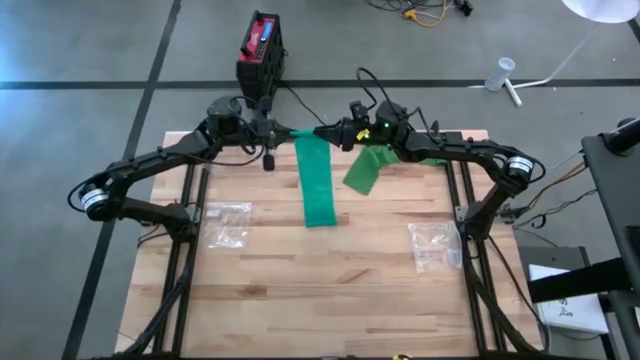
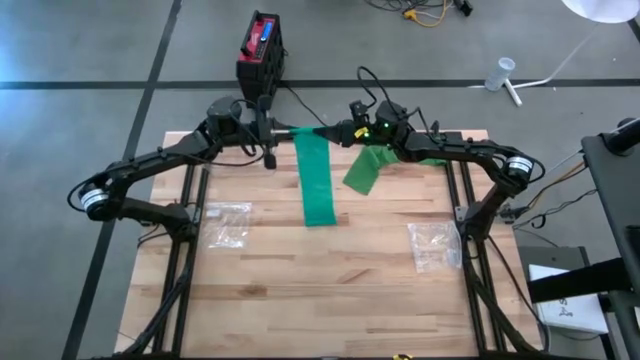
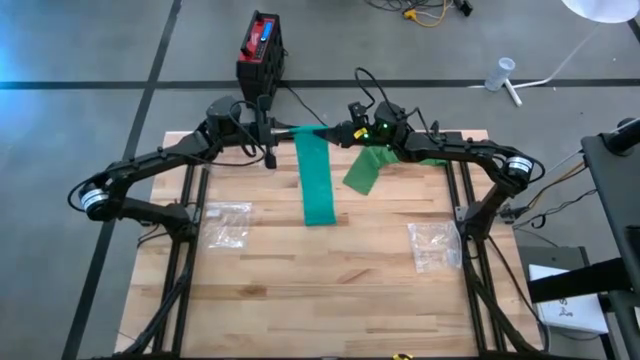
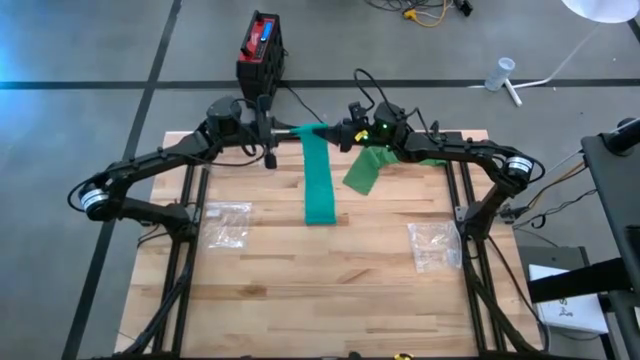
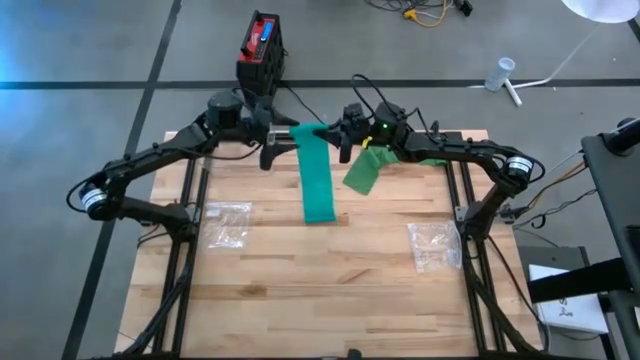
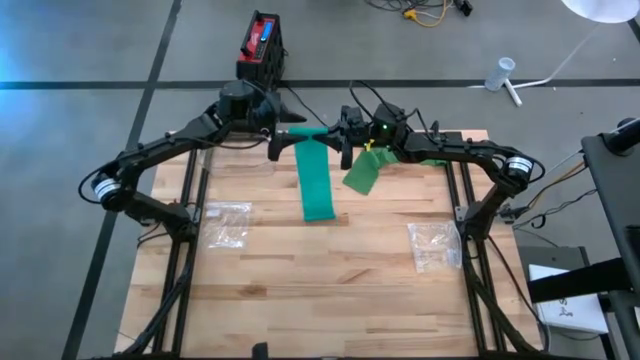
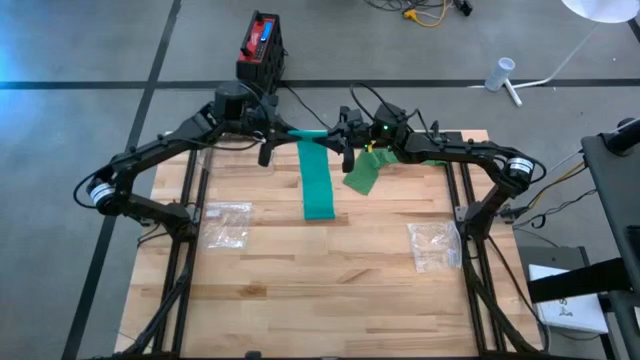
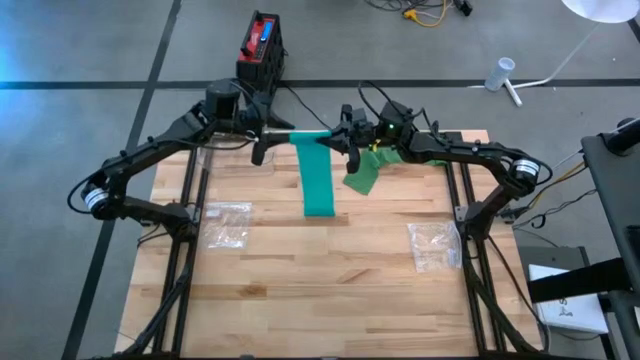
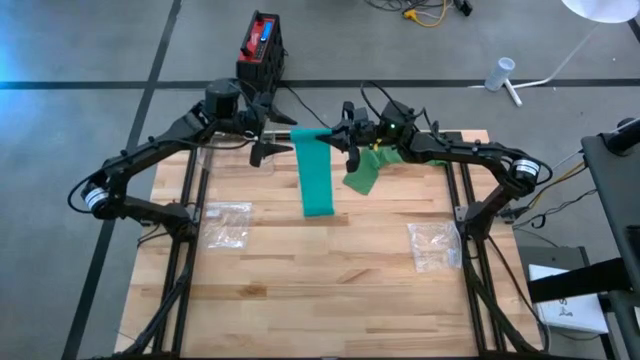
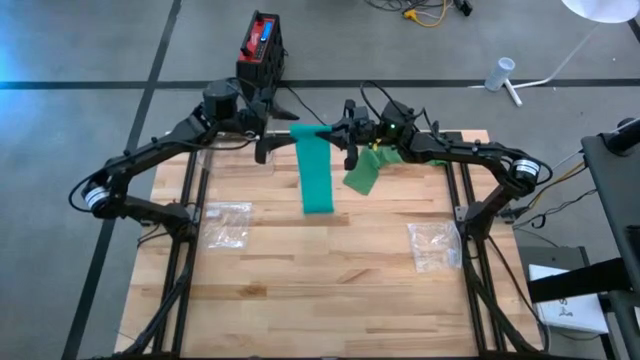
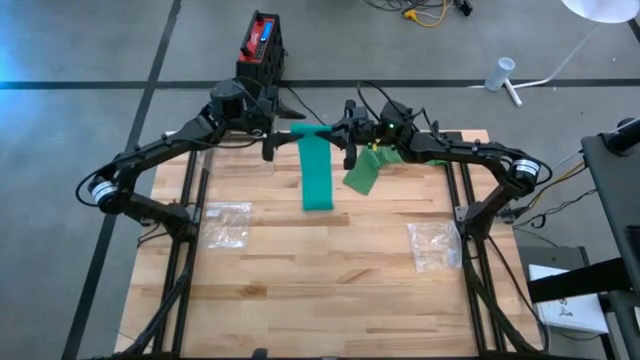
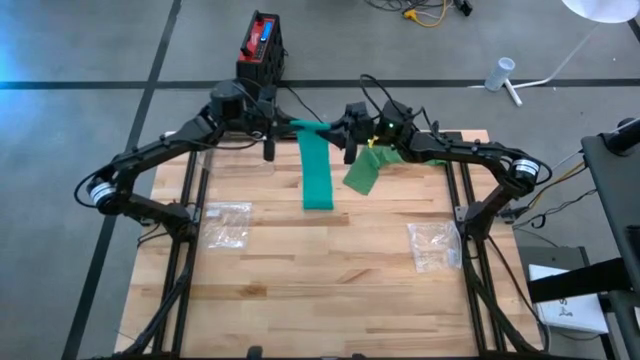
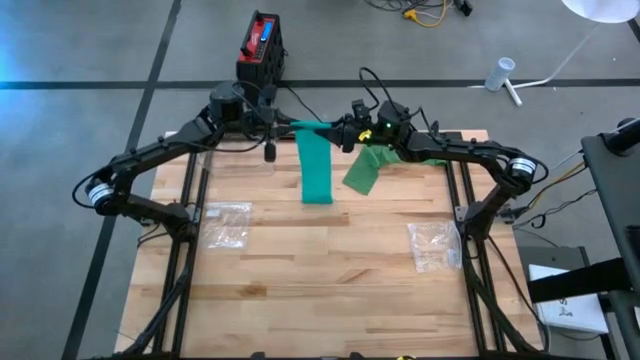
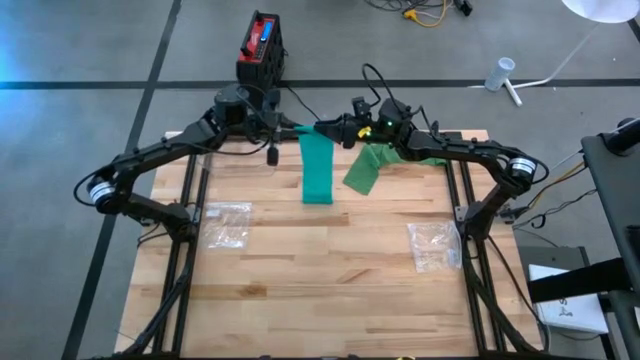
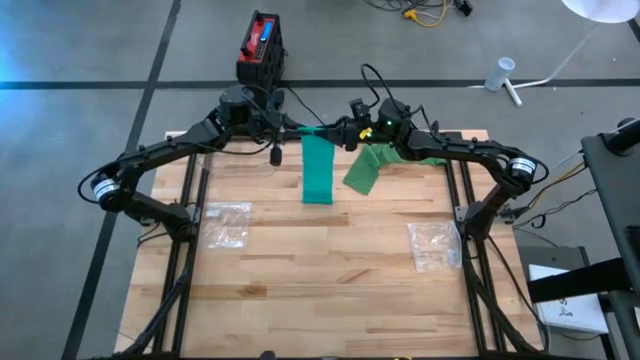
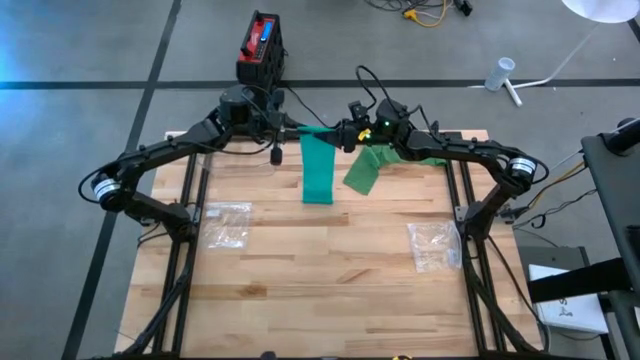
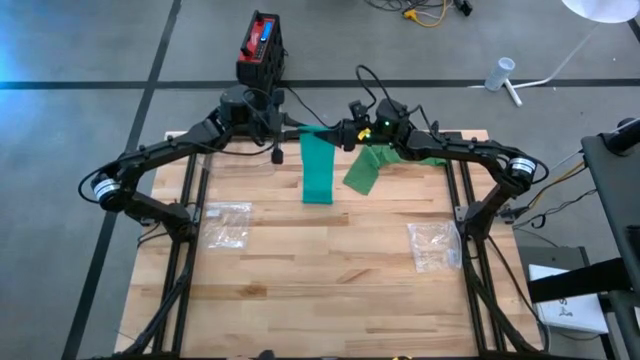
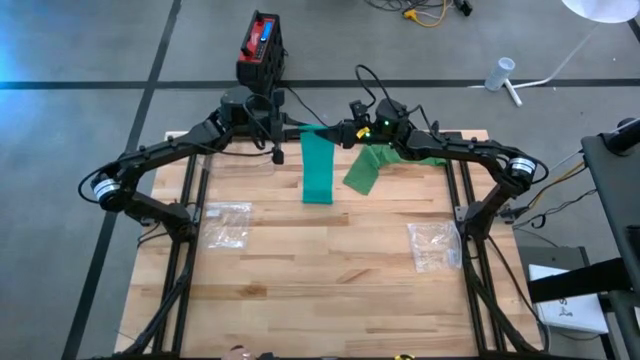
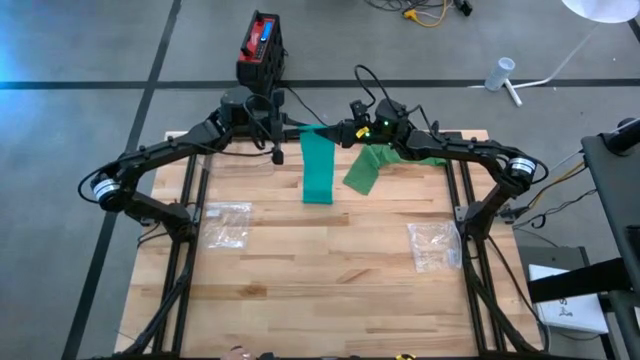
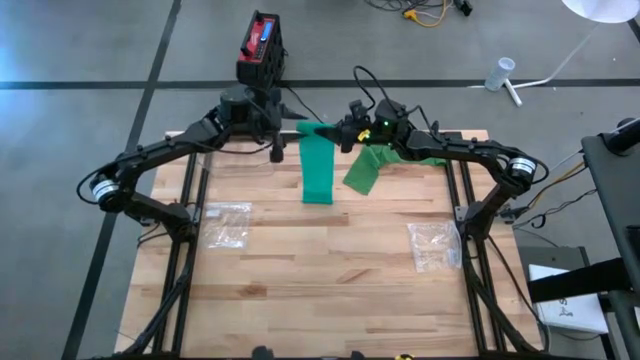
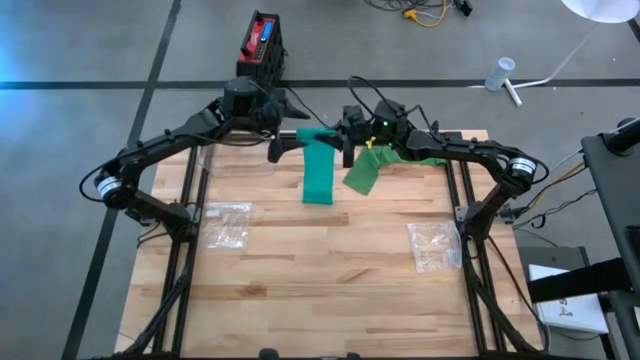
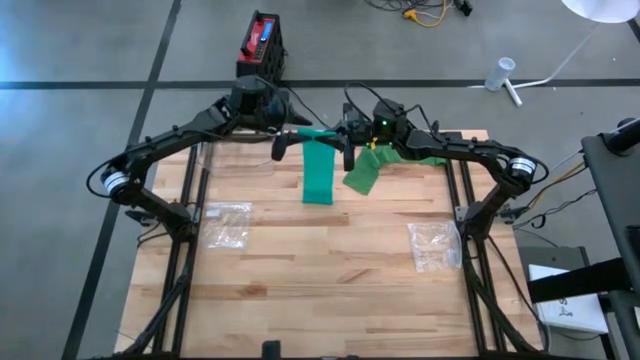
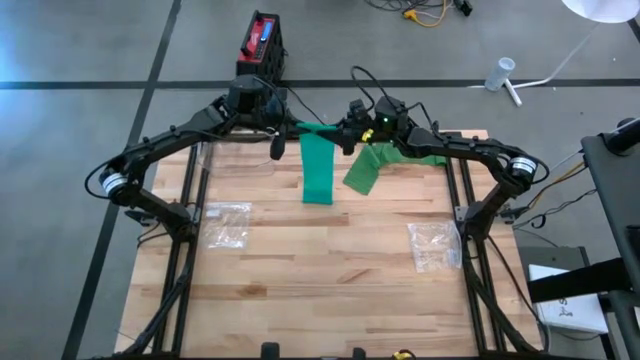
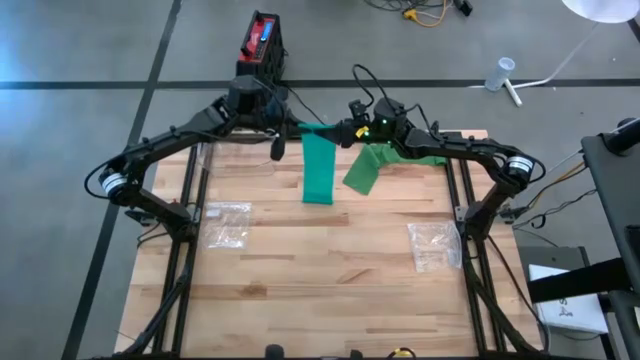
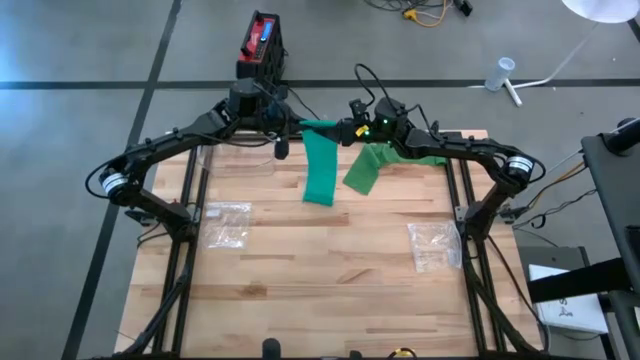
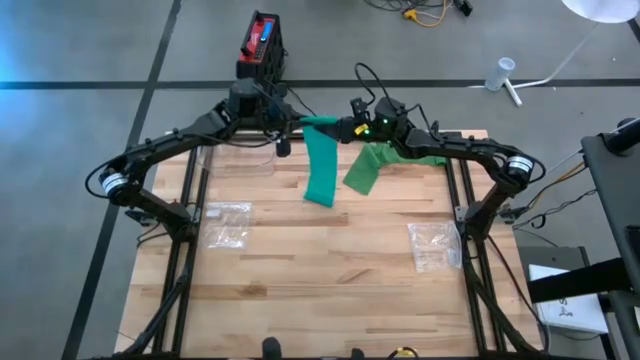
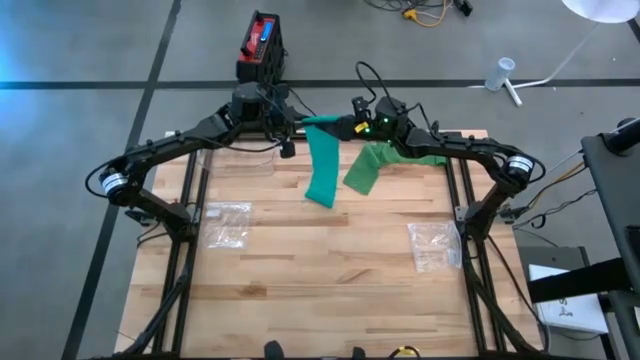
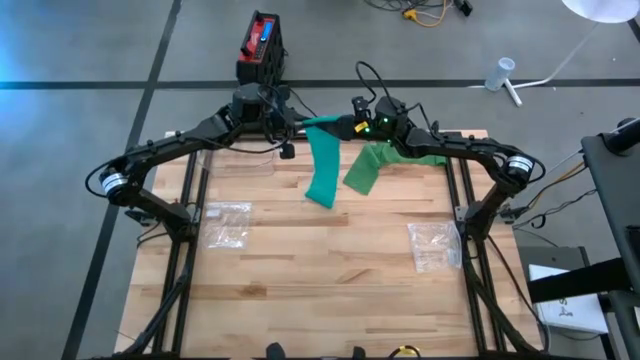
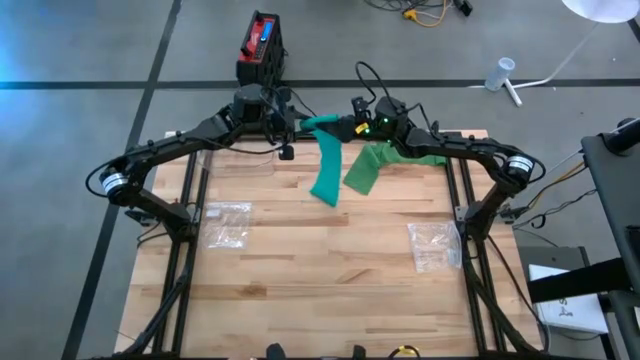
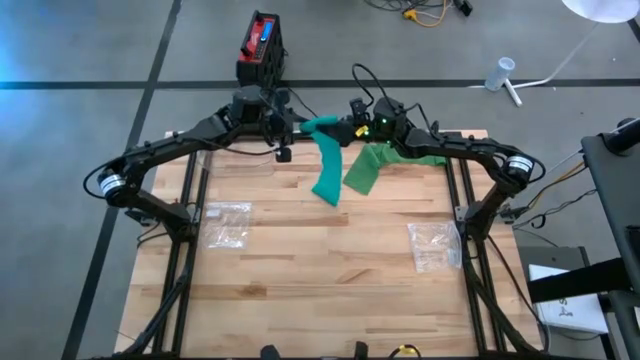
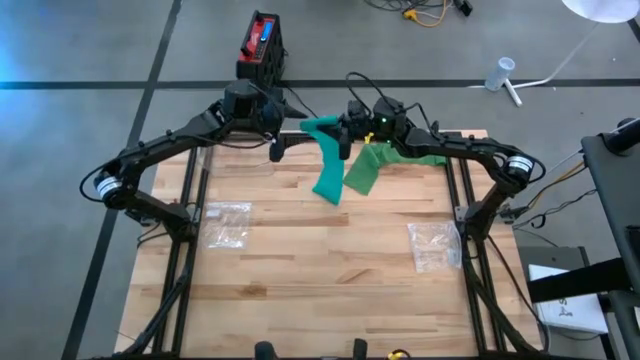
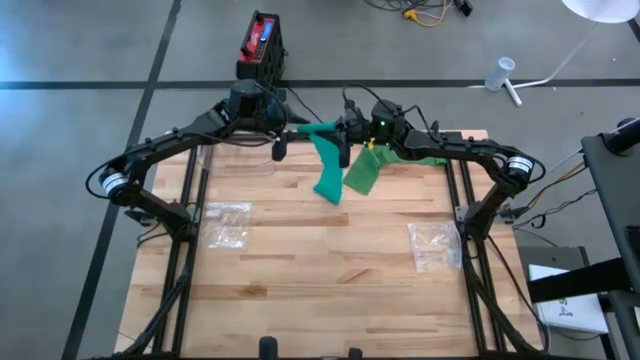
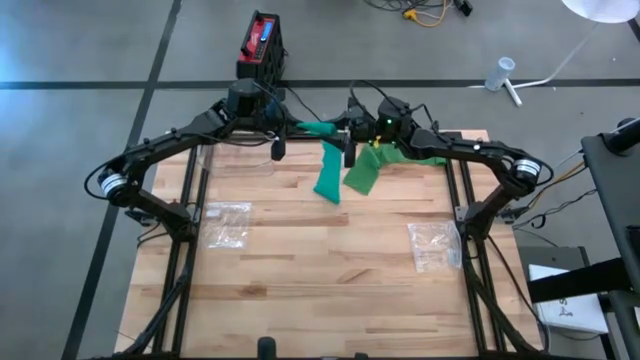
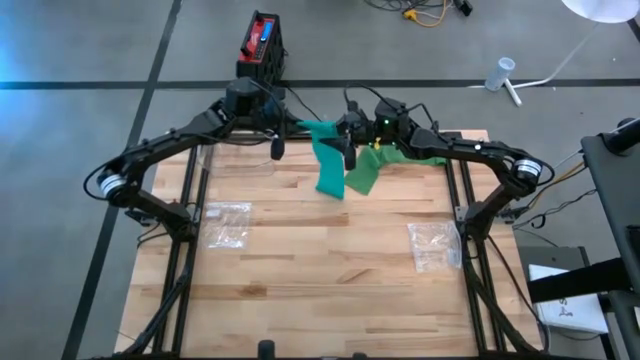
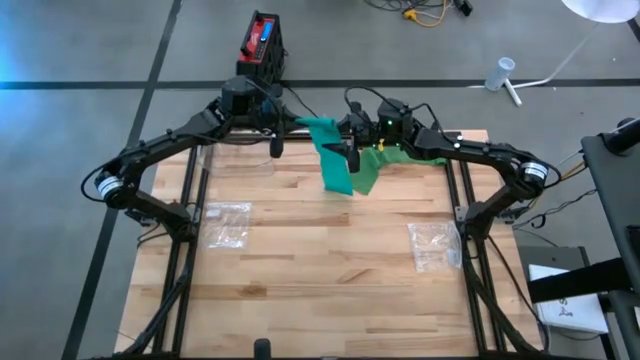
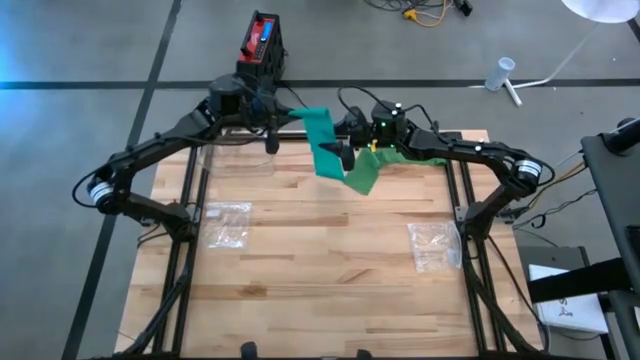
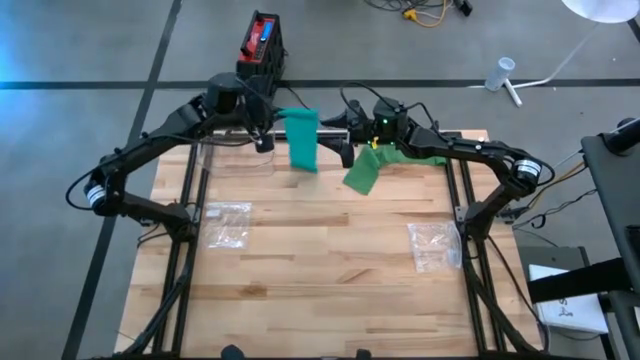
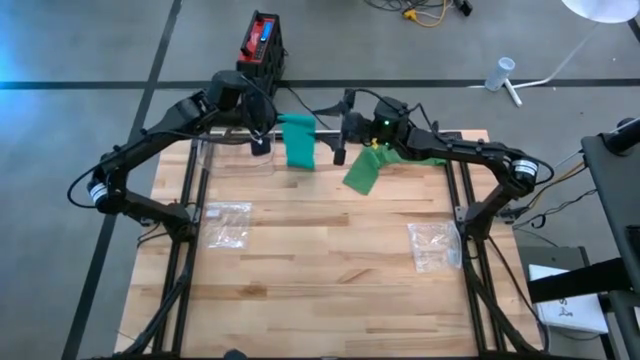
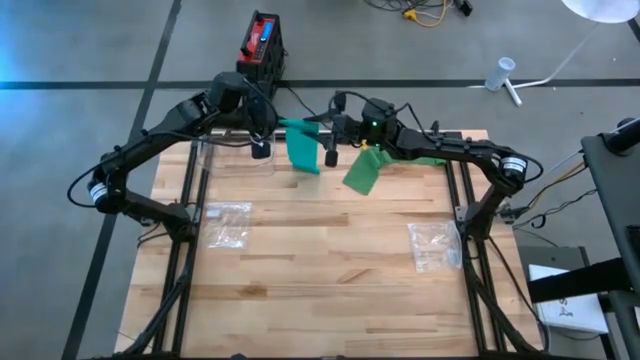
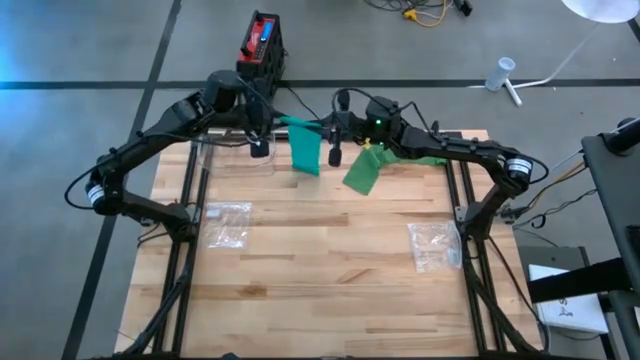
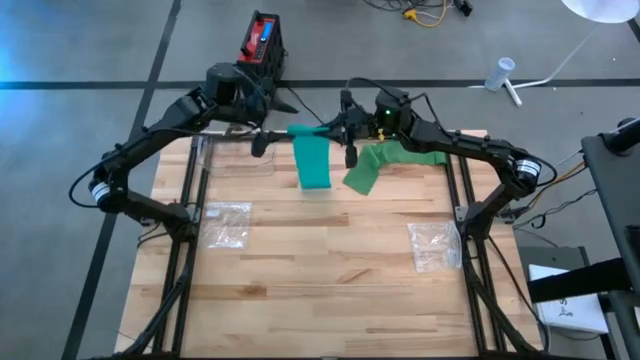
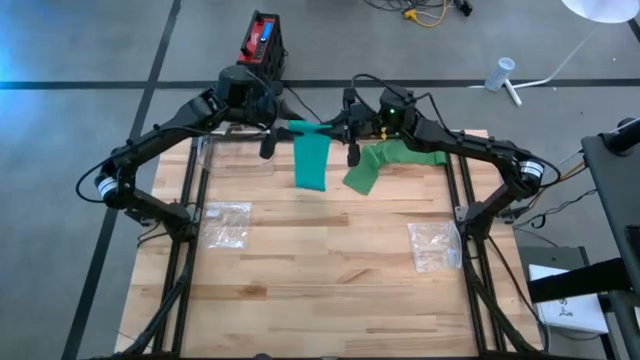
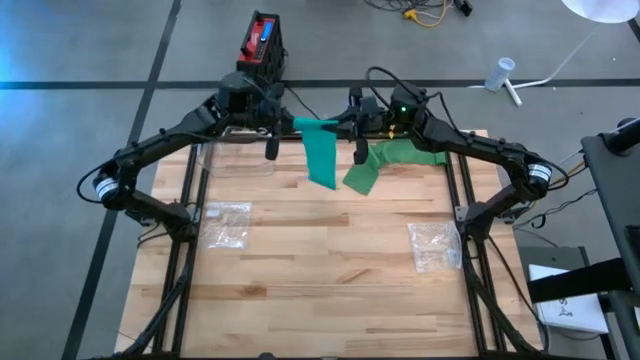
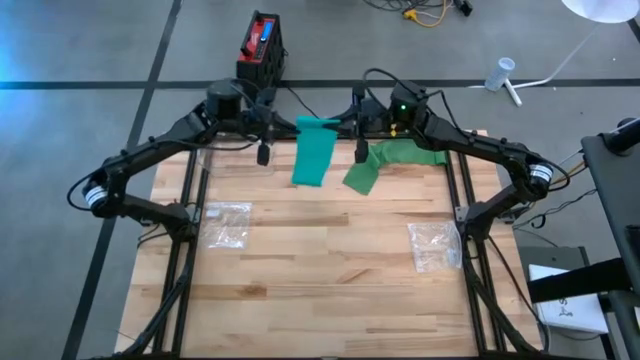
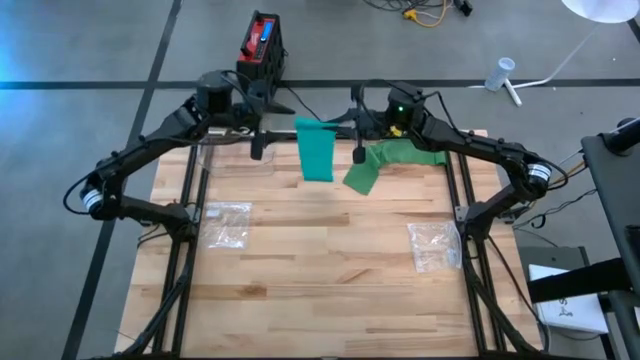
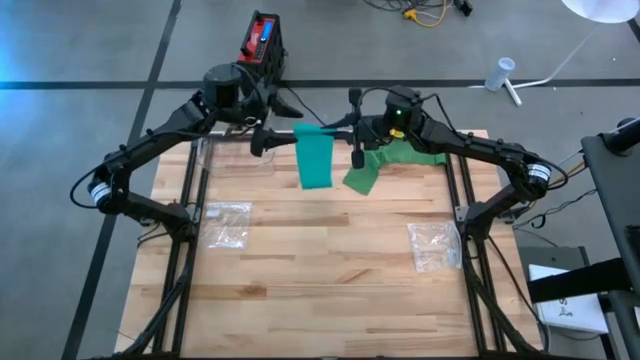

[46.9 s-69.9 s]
Task: Roll bandage
Roll the blue bandage
